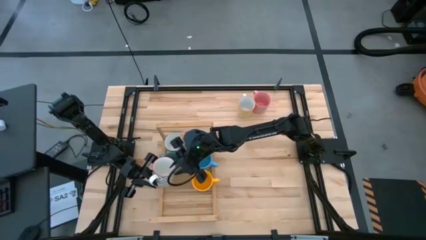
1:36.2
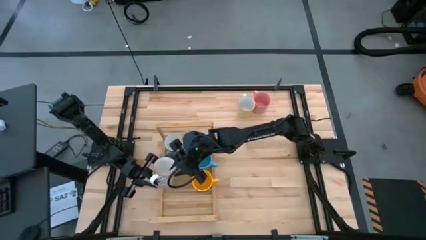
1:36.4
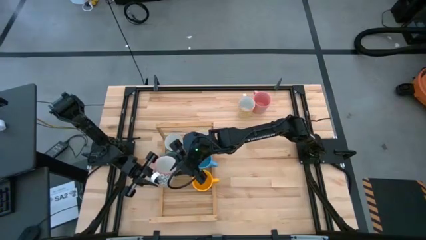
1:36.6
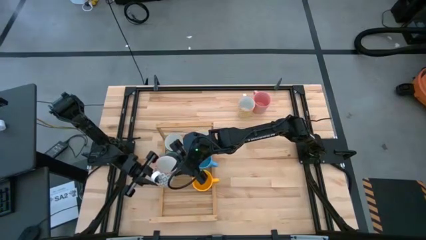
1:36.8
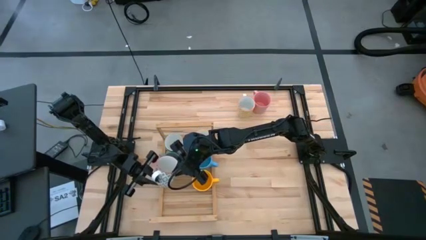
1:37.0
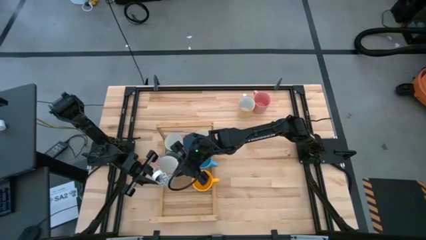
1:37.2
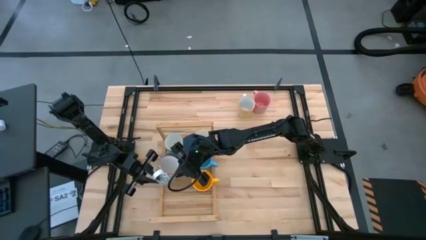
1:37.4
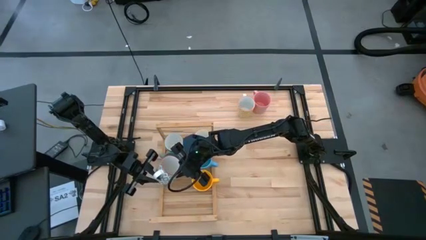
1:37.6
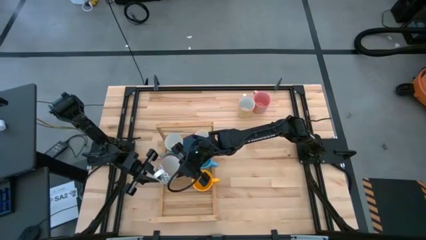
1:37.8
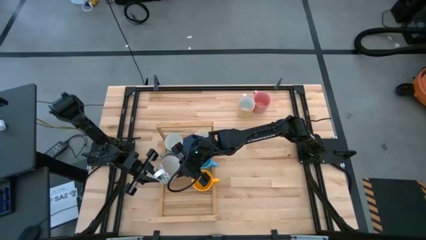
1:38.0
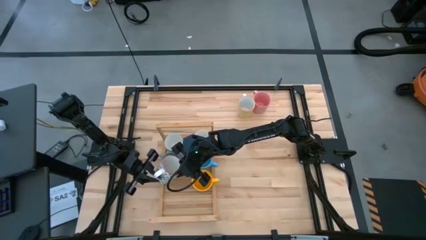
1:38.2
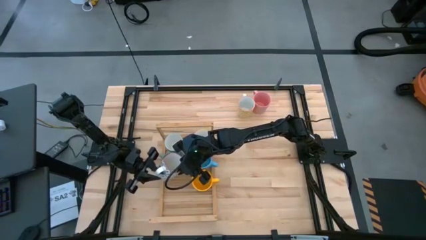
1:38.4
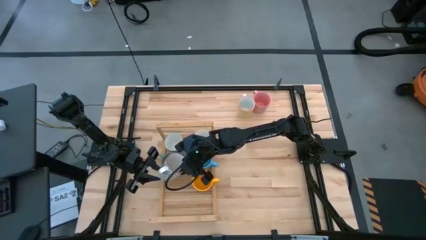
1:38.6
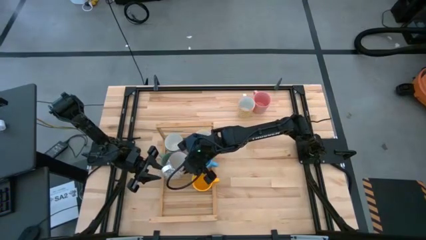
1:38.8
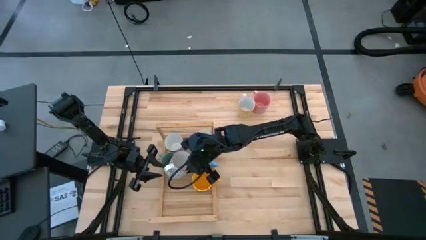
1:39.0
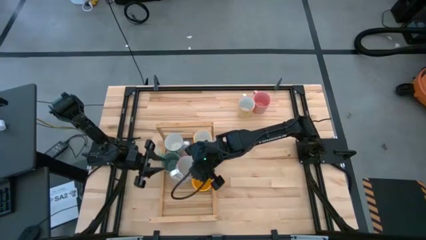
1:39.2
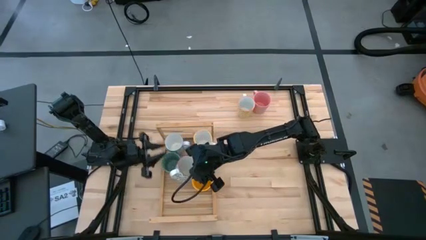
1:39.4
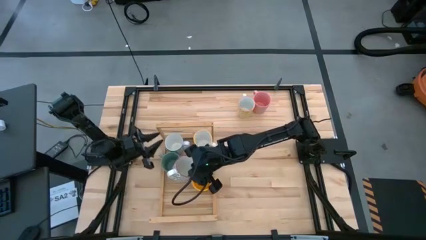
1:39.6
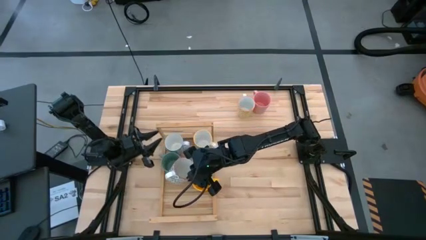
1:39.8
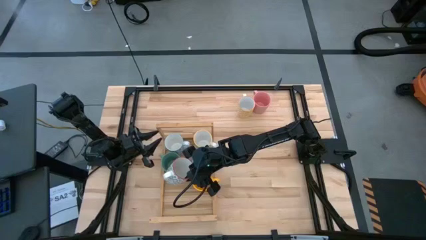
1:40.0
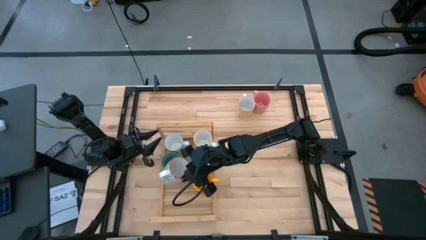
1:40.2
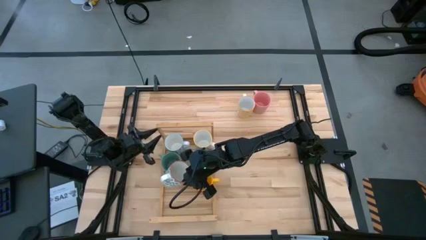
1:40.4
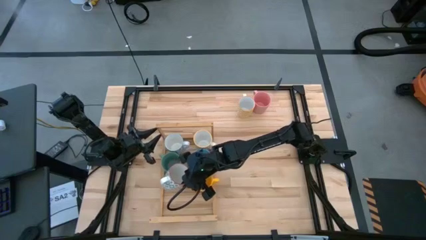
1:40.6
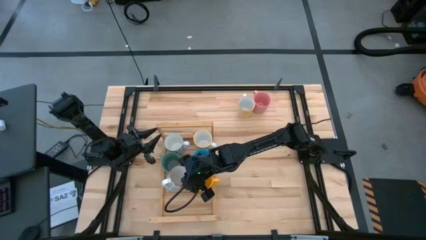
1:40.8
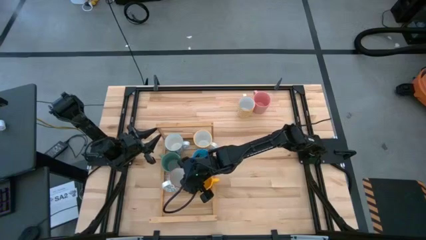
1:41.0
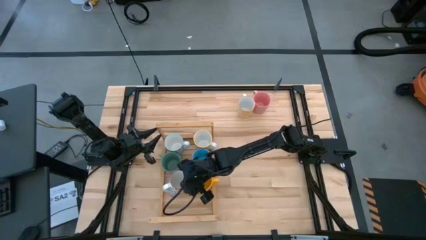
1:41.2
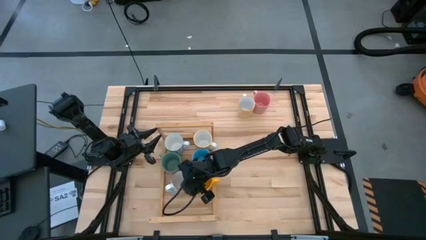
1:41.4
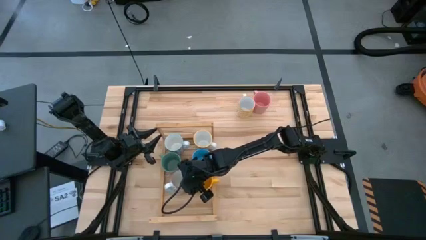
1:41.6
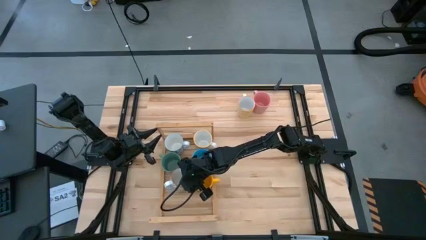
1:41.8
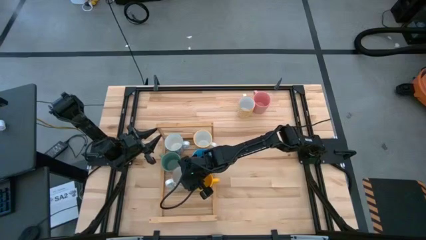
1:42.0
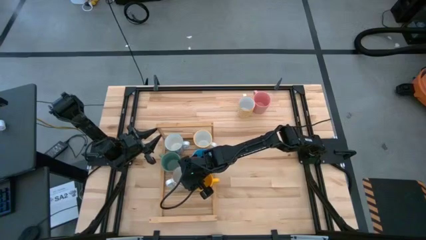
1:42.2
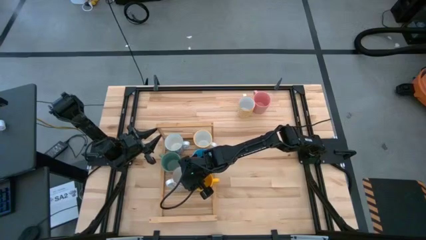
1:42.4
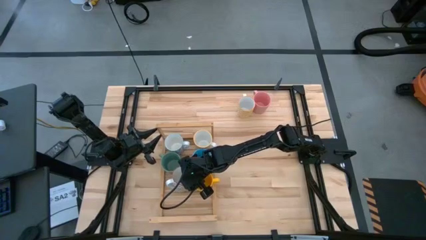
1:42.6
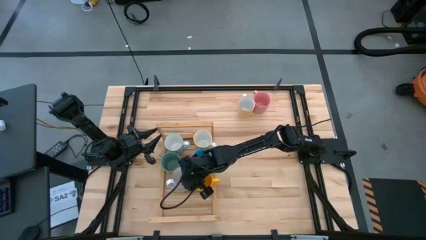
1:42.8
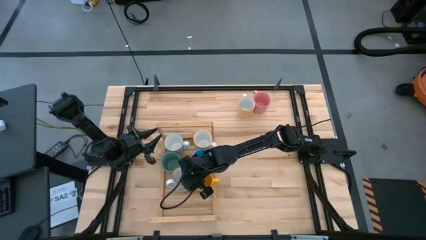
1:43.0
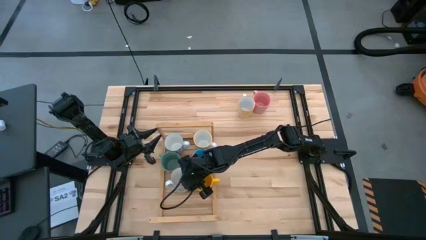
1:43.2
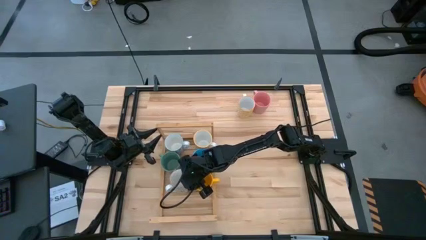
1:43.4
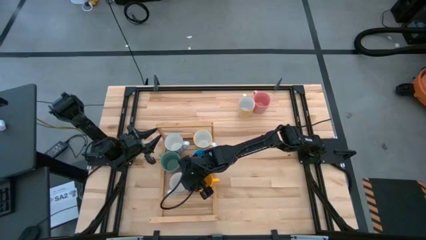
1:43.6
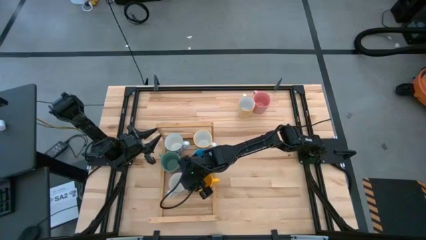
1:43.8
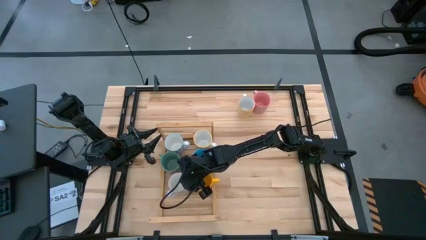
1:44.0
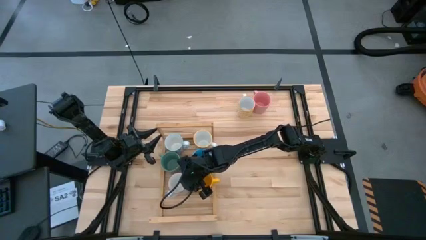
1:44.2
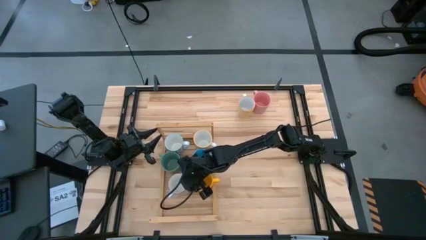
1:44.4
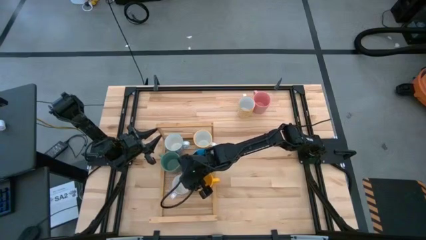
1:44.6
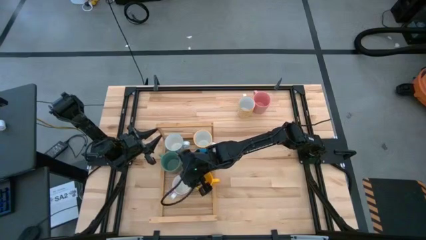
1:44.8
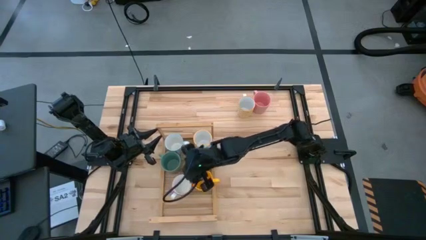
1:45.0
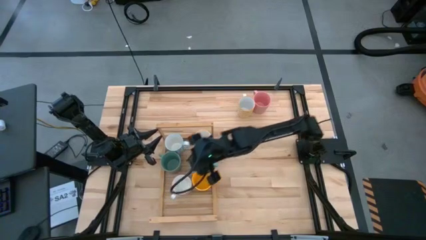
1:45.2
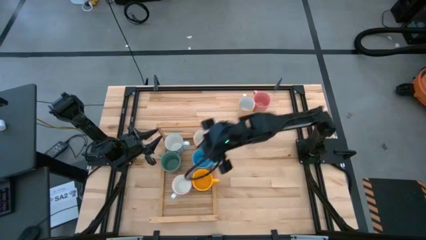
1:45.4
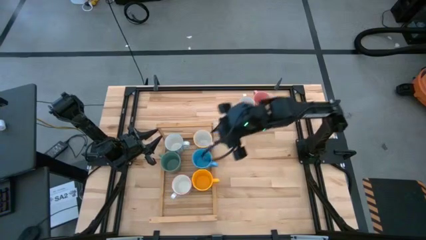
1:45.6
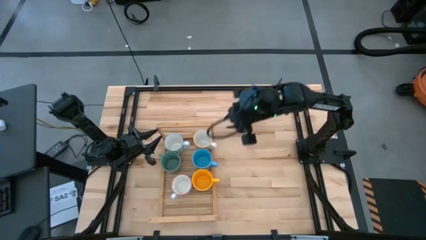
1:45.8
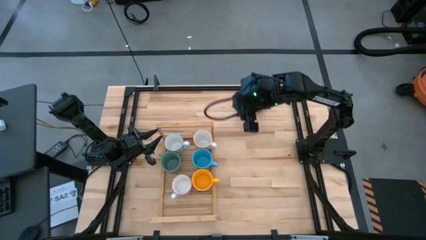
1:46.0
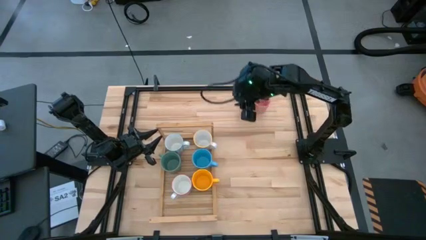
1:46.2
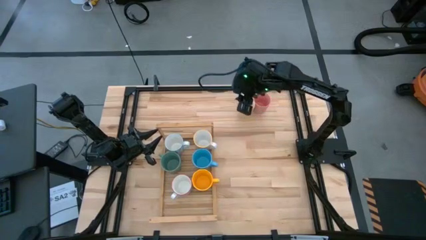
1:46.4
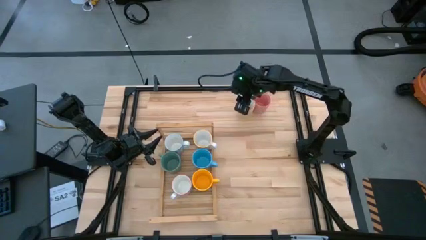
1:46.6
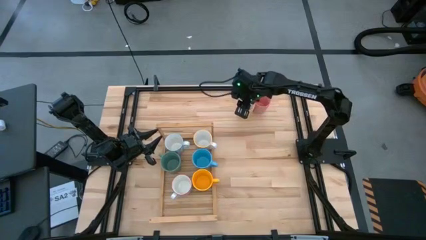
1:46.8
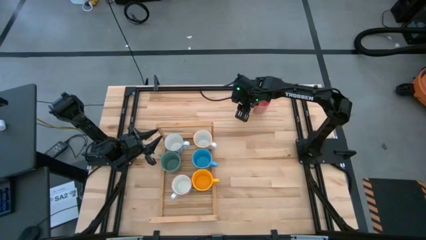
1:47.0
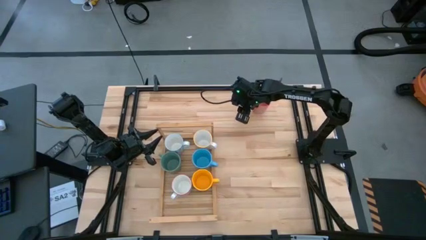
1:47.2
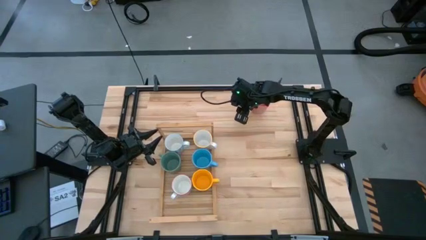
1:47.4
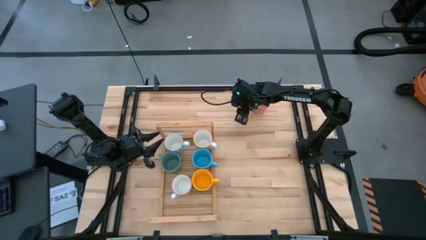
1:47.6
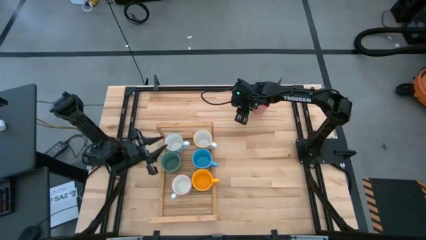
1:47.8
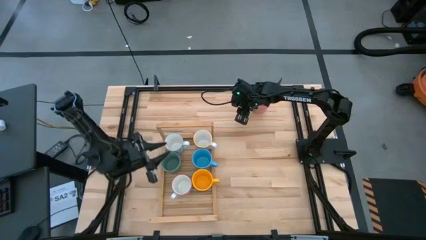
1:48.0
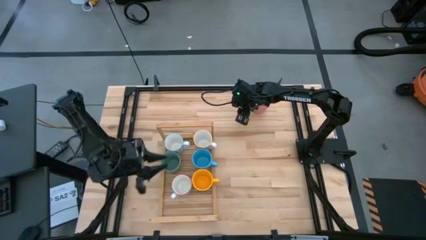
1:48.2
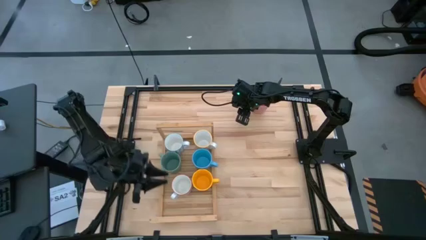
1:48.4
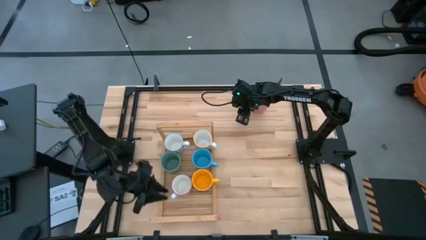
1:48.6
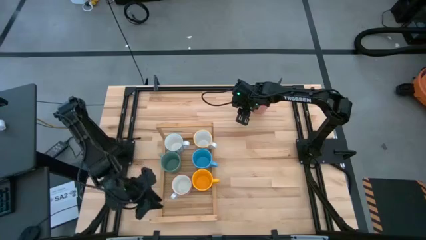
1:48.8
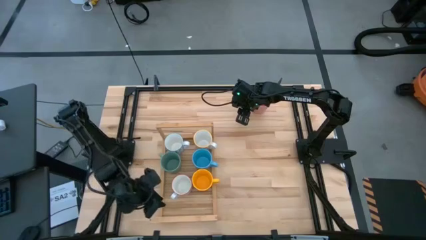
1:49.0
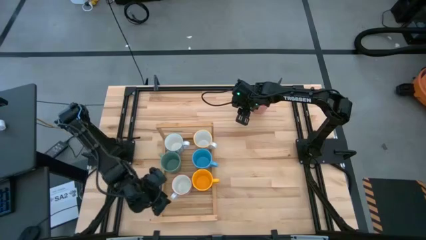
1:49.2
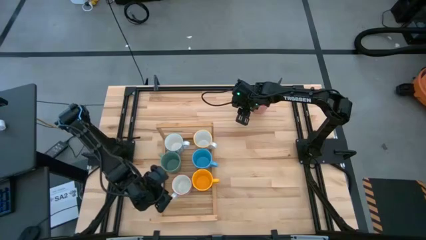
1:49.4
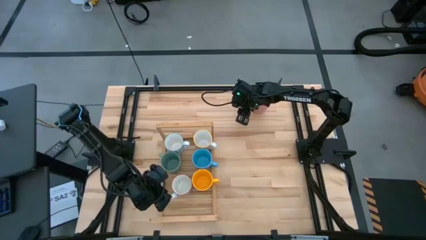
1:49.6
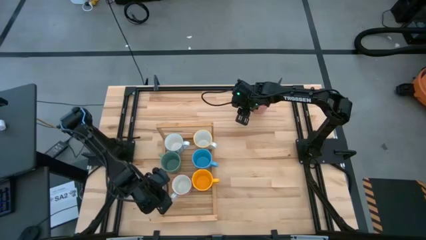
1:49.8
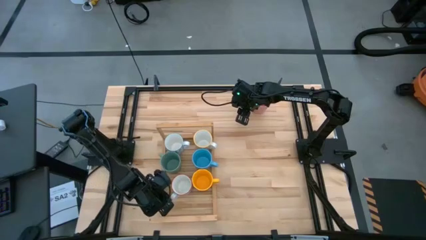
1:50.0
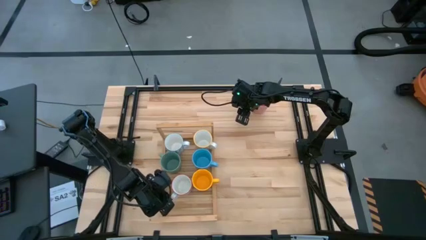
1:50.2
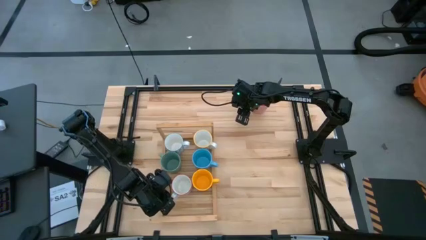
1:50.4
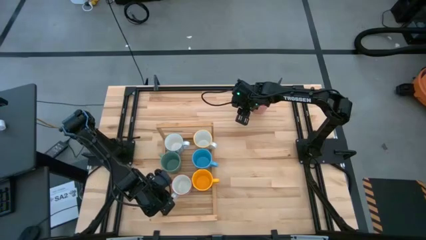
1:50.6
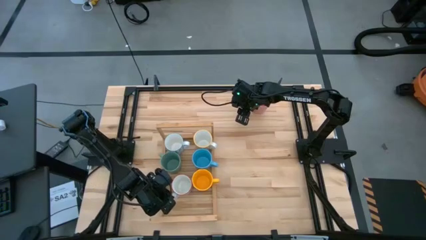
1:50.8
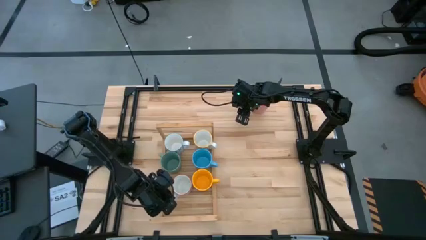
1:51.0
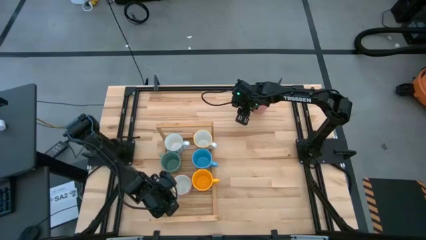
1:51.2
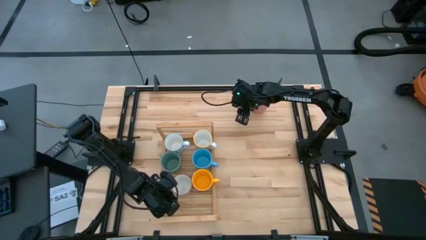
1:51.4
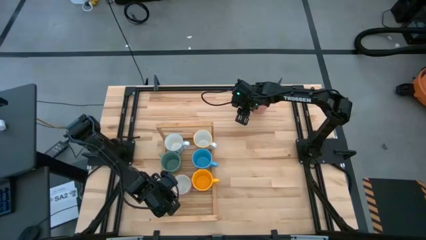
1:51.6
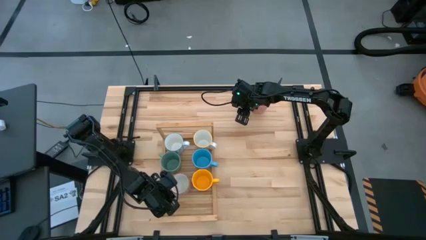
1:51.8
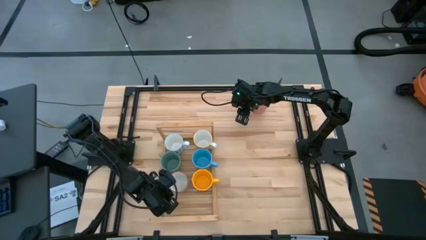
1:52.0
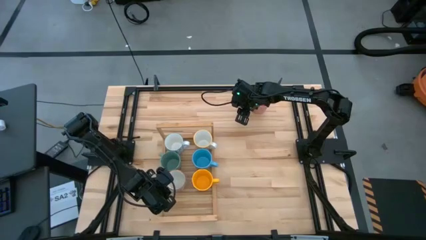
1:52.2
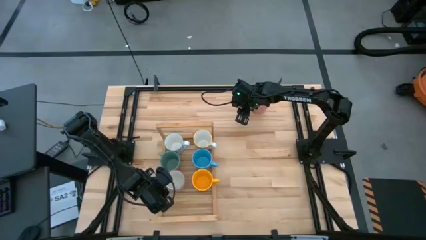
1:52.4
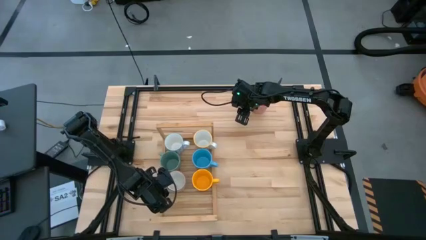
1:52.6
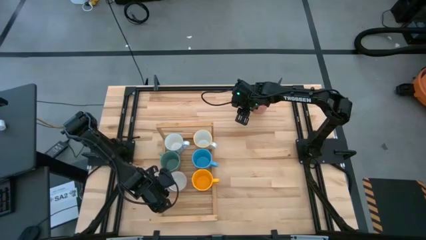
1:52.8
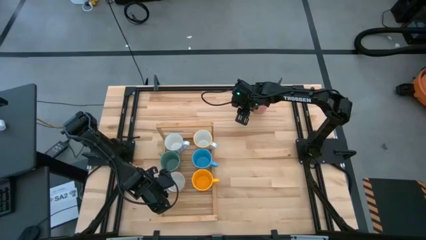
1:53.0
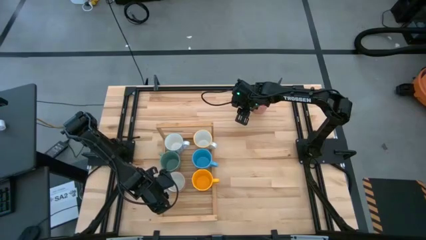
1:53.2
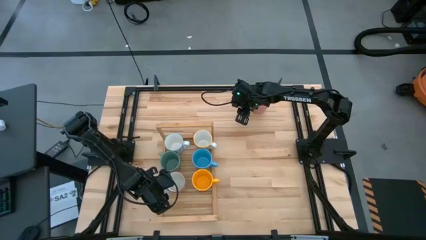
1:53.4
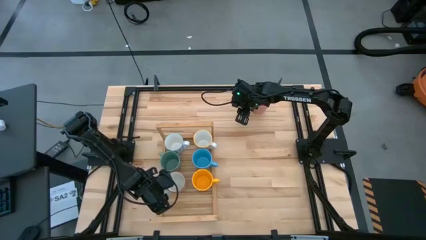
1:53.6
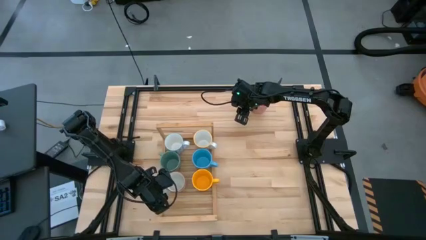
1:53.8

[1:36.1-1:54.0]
Task: Place coffee mugs
Put the gray and white mug on the shelf aligned with the dark yellow mug
